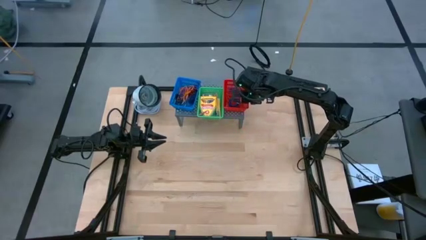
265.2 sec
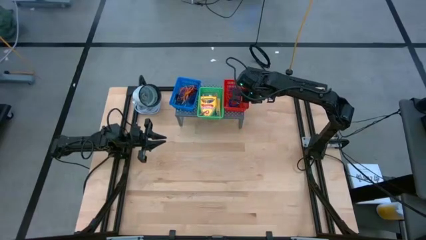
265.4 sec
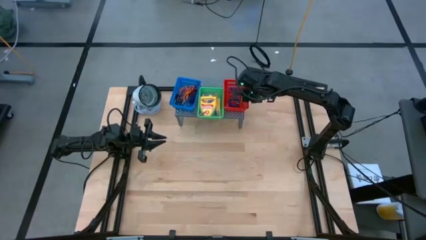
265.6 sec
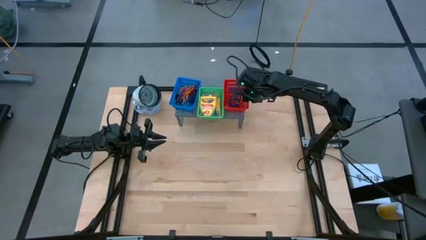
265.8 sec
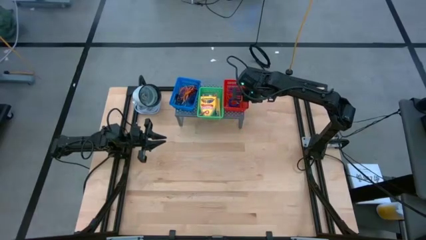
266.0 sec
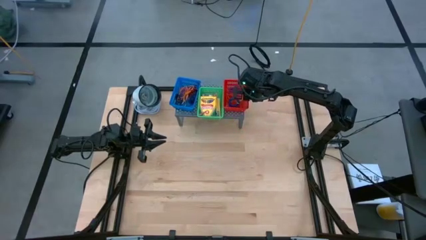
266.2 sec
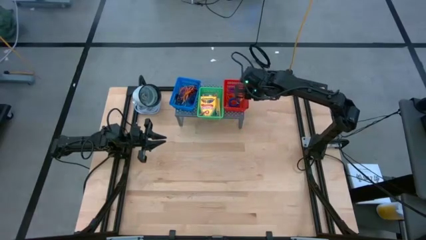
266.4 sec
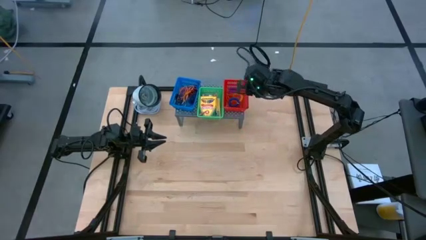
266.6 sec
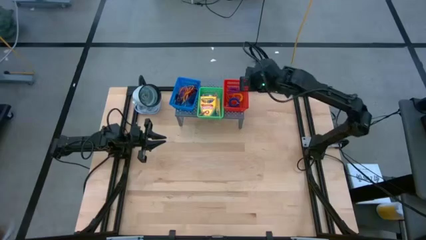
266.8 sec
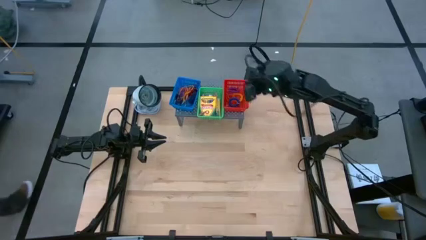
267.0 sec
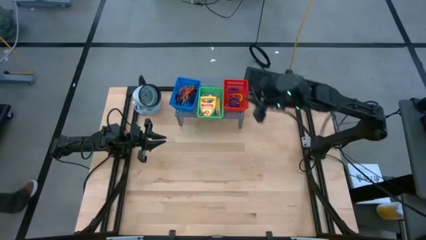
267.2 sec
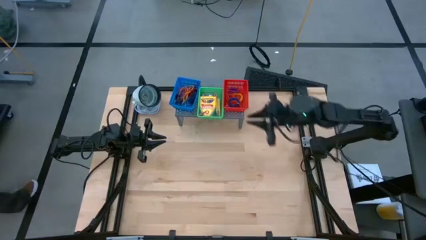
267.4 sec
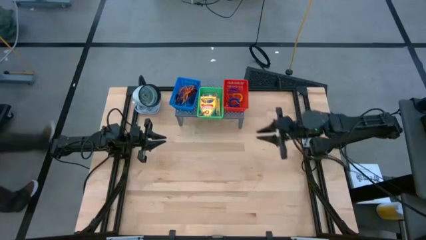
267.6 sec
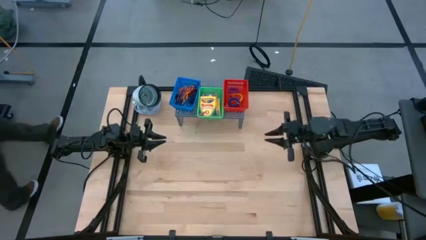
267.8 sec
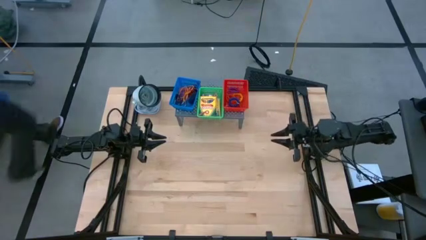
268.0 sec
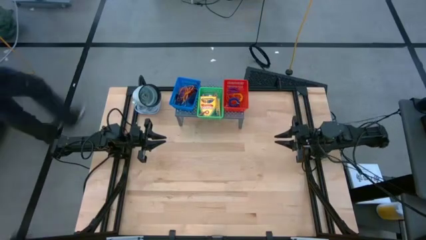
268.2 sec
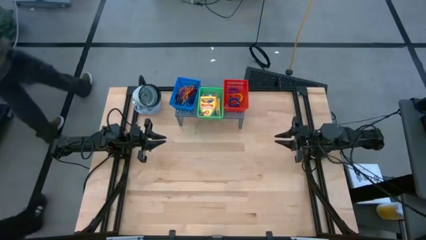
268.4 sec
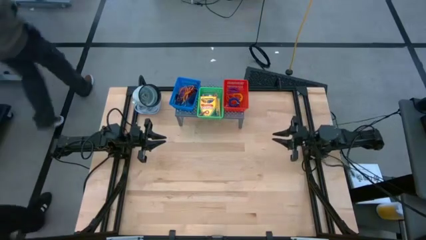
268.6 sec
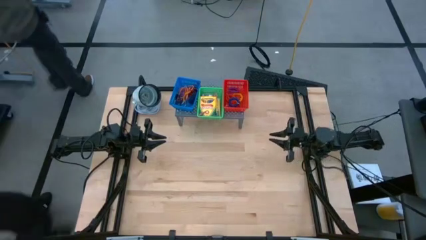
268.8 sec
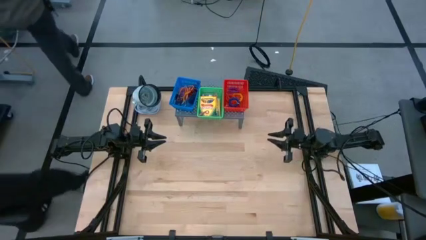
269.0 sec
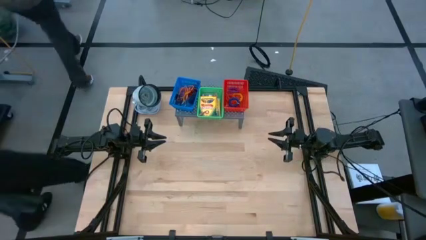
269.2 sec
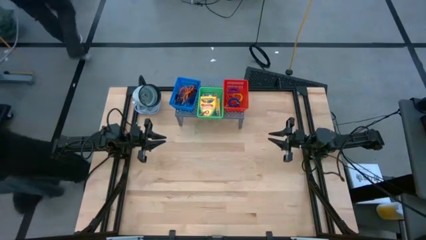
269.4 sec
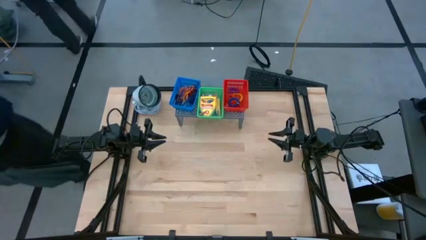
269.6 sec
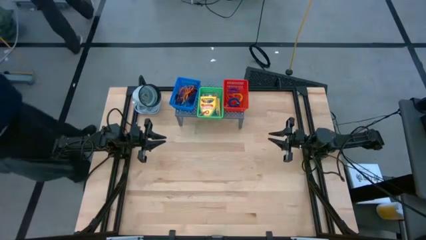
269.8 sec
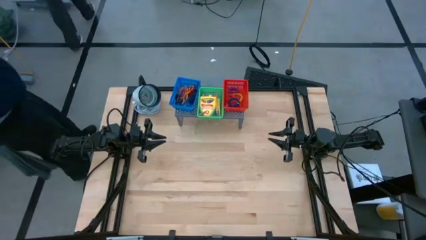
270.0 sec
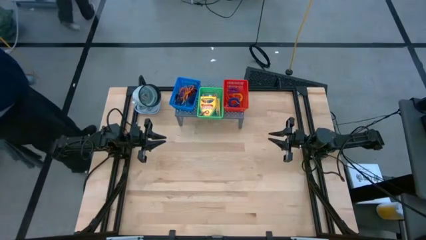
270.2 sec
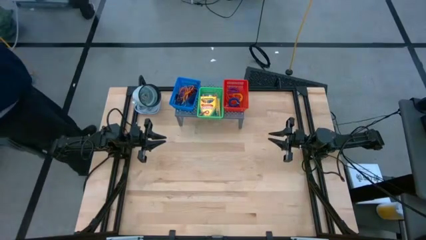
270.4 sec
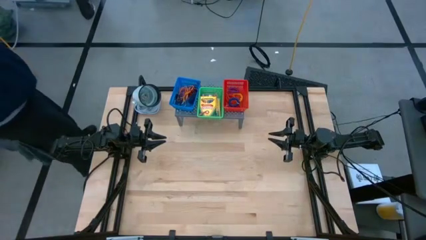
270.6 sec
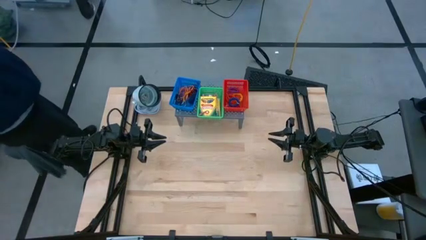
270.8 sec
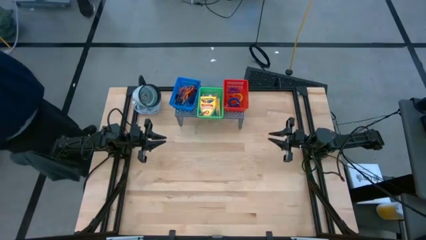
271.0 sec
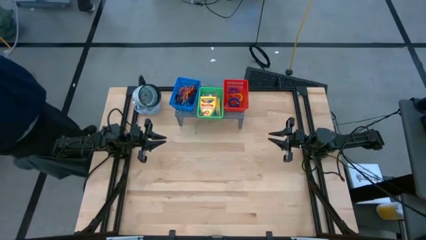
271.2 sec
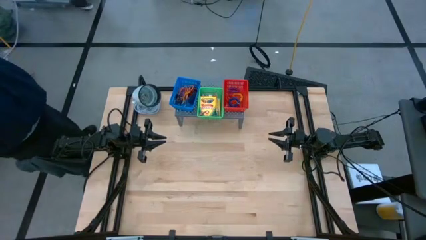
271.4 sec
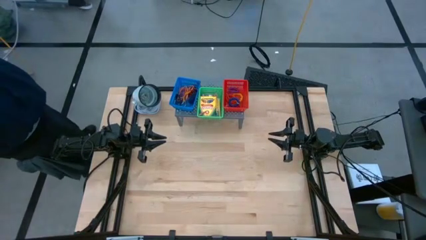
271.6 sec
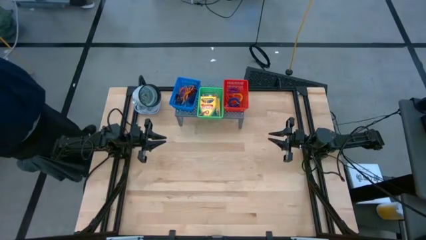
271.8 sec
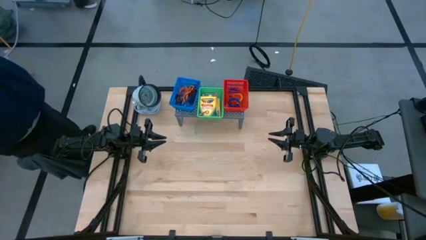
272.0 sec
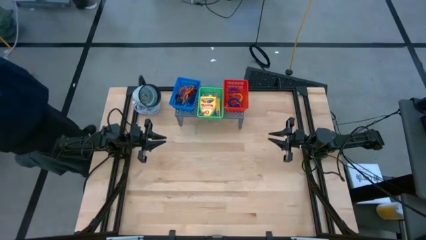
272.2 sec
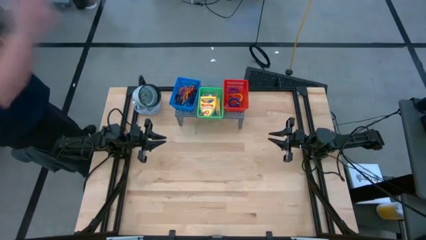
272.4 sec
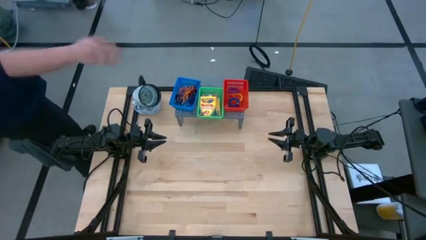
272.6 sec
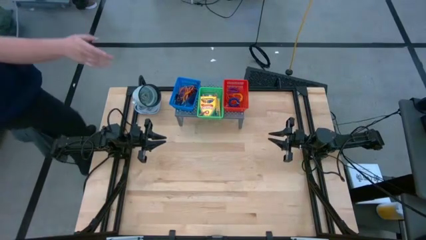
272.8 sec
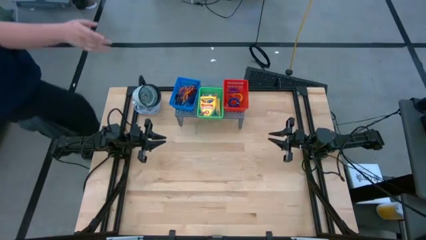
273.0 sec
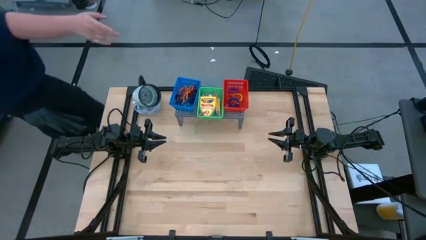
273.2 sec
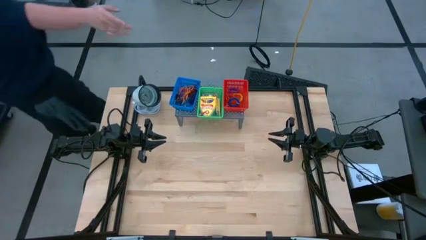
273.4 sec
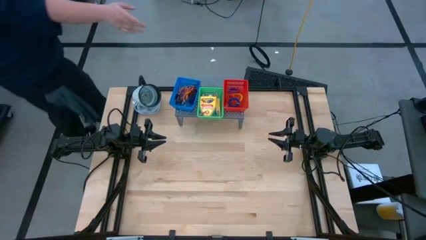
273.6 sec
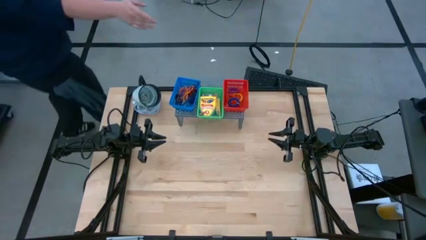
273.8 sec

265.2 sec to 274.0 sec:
Task: Pick & Place Office Desk Supplies
Return to Home Position
